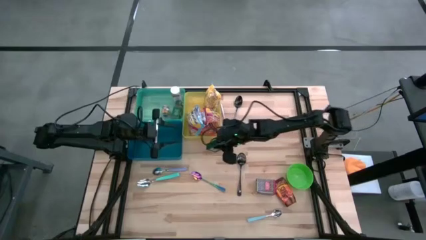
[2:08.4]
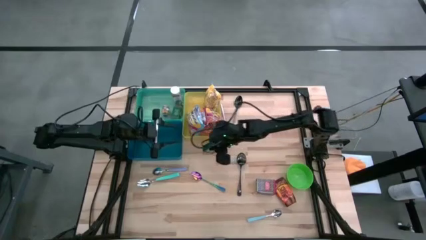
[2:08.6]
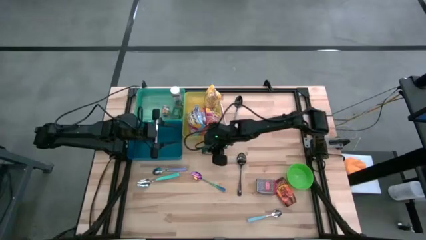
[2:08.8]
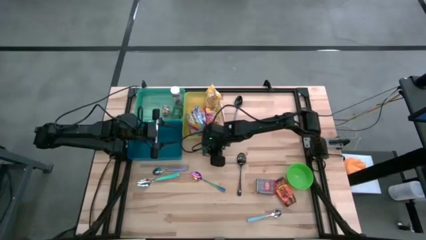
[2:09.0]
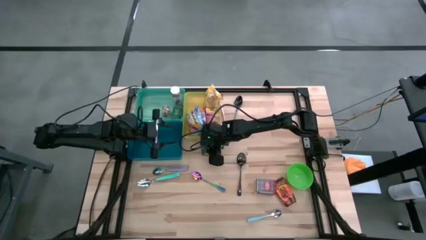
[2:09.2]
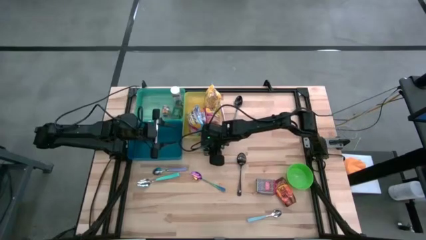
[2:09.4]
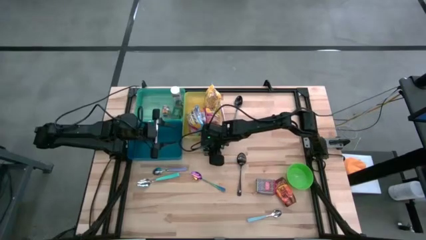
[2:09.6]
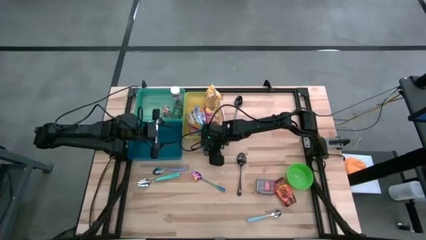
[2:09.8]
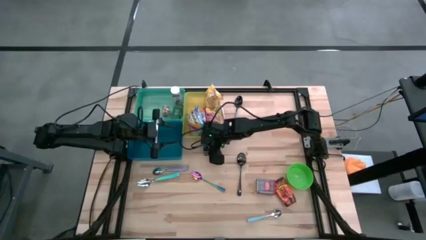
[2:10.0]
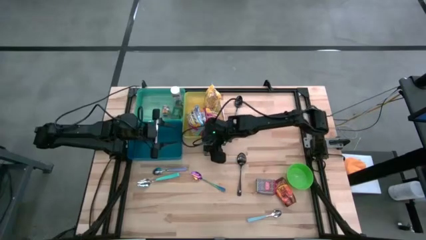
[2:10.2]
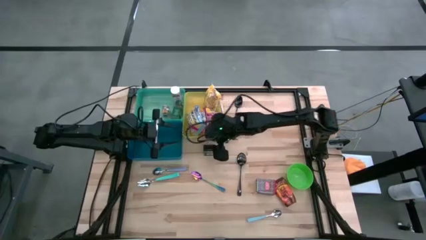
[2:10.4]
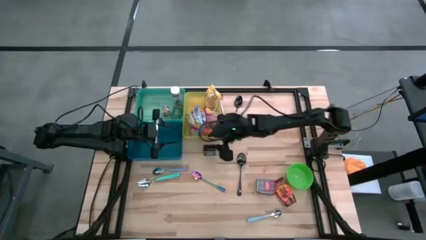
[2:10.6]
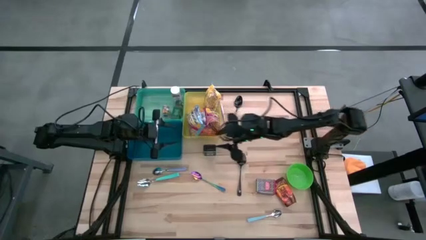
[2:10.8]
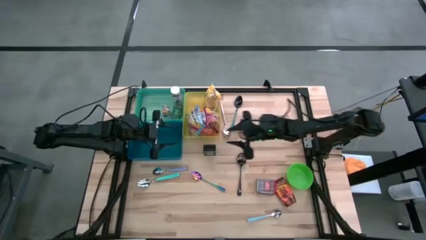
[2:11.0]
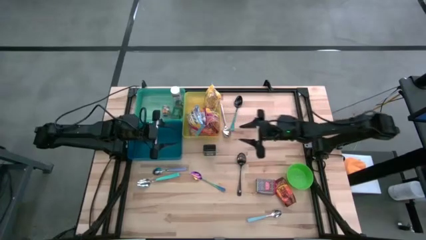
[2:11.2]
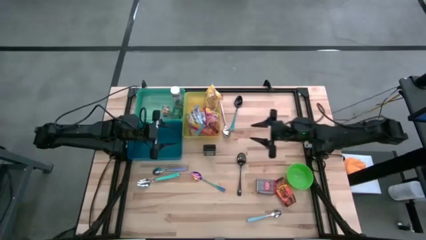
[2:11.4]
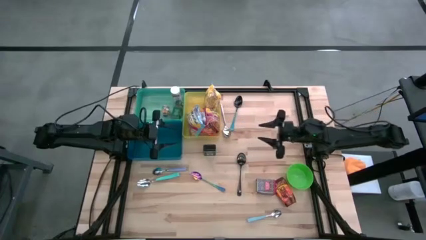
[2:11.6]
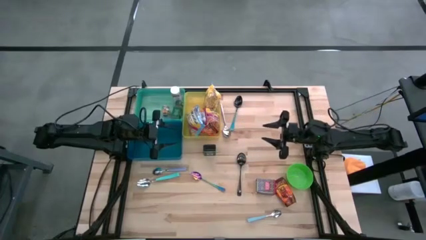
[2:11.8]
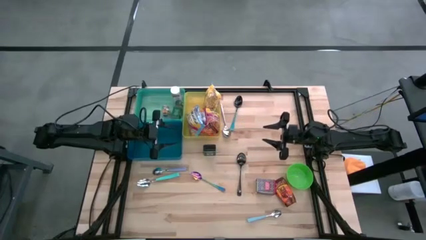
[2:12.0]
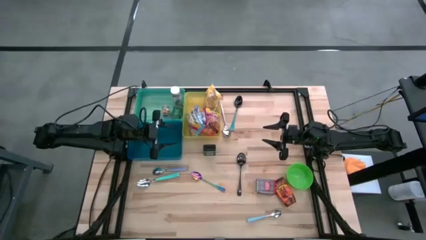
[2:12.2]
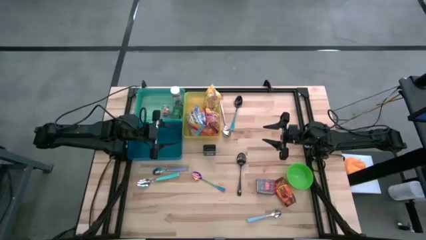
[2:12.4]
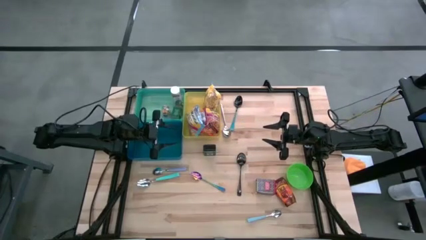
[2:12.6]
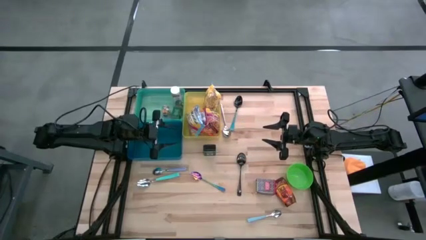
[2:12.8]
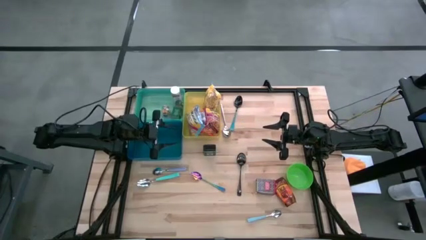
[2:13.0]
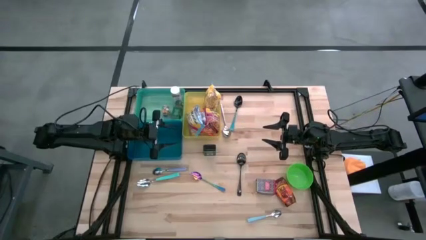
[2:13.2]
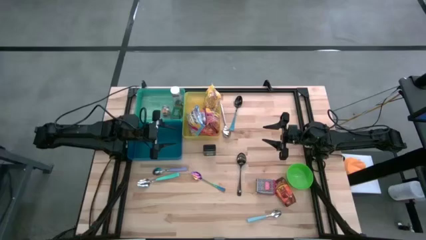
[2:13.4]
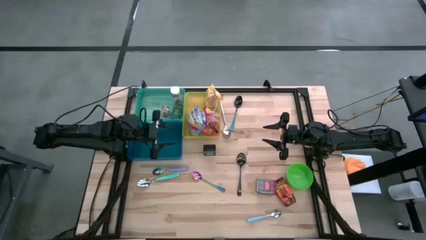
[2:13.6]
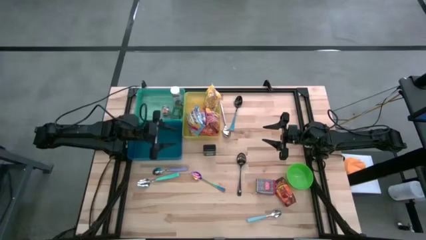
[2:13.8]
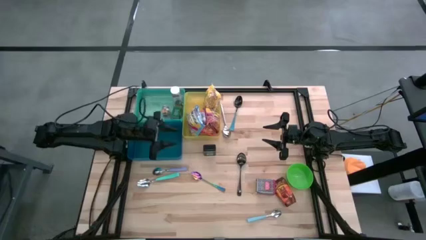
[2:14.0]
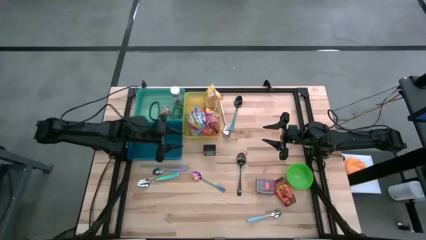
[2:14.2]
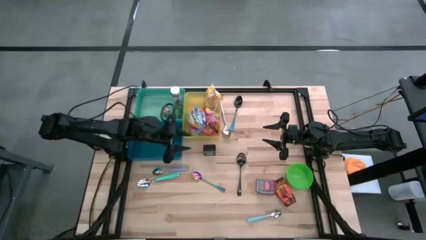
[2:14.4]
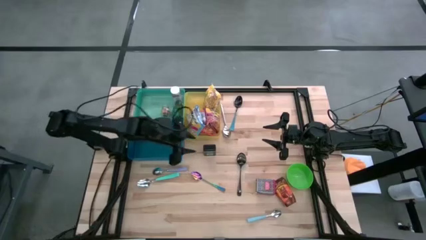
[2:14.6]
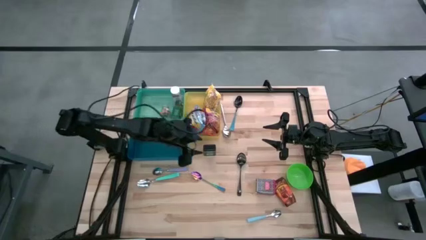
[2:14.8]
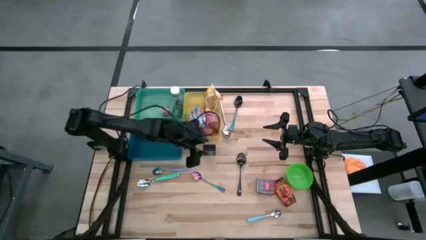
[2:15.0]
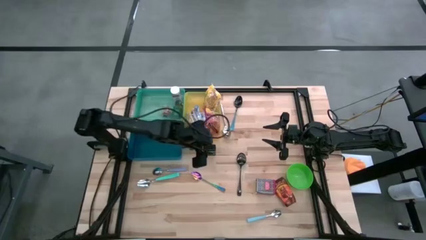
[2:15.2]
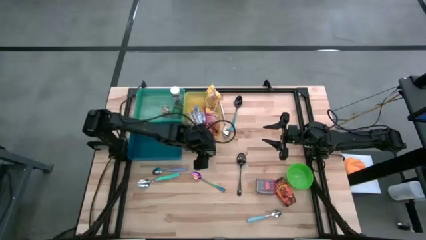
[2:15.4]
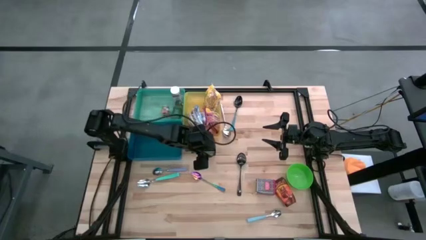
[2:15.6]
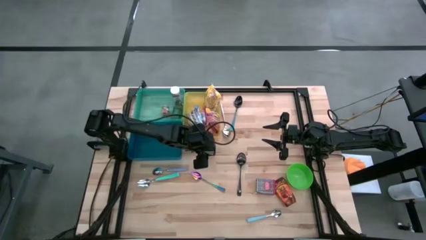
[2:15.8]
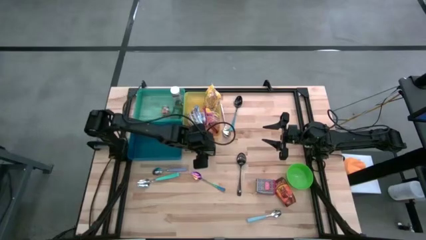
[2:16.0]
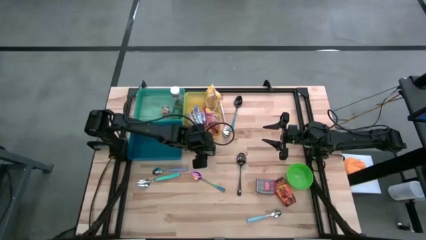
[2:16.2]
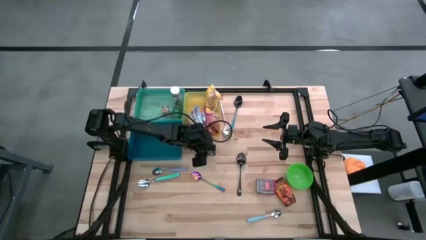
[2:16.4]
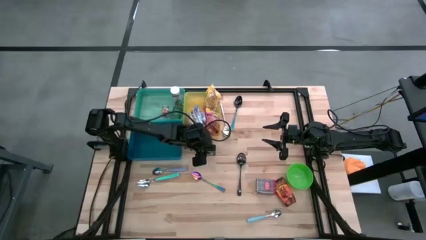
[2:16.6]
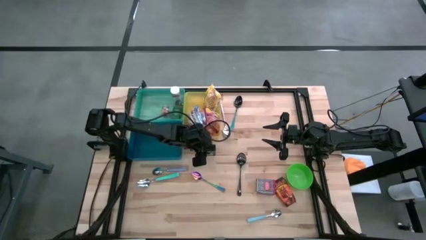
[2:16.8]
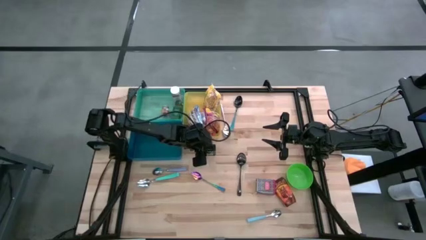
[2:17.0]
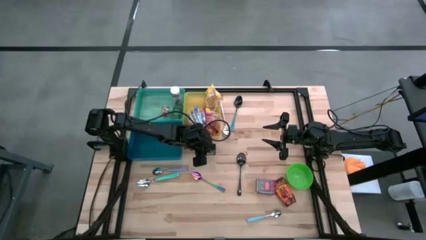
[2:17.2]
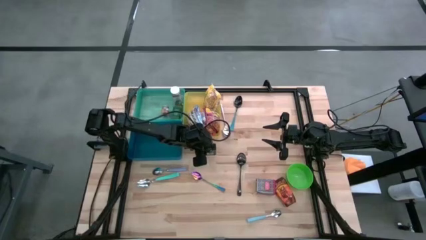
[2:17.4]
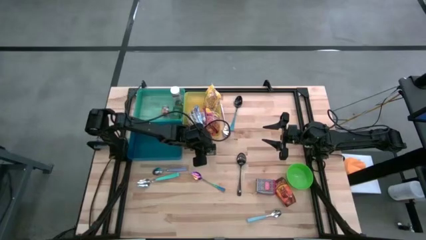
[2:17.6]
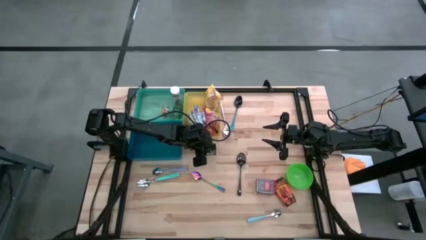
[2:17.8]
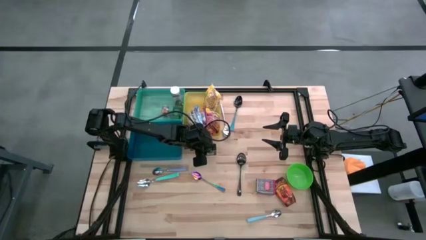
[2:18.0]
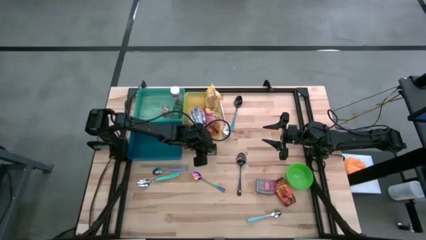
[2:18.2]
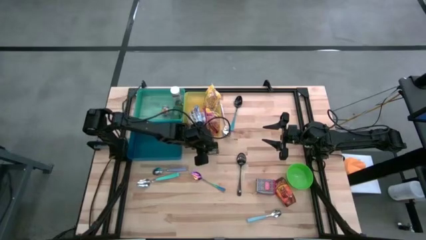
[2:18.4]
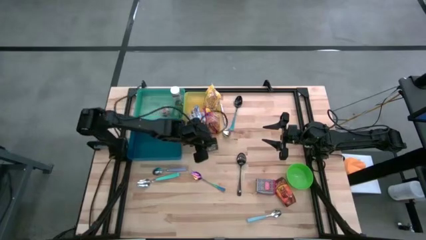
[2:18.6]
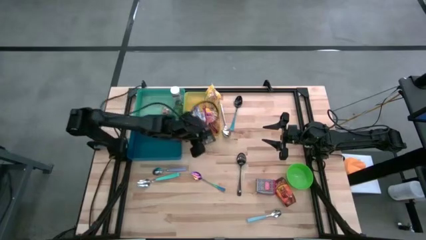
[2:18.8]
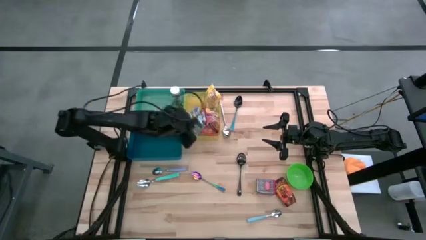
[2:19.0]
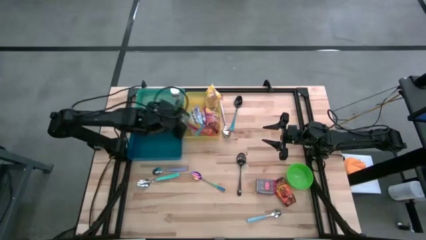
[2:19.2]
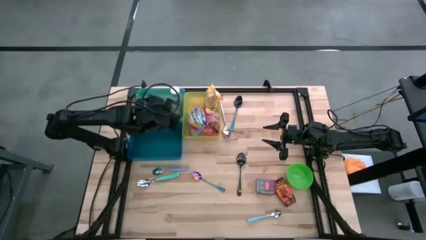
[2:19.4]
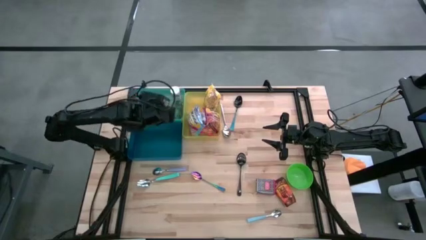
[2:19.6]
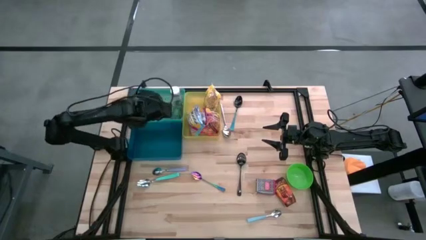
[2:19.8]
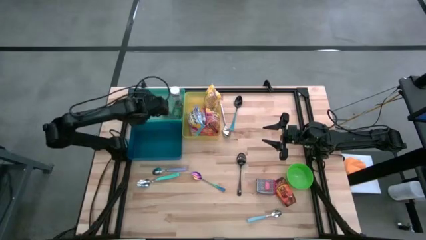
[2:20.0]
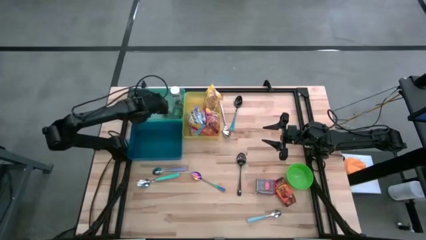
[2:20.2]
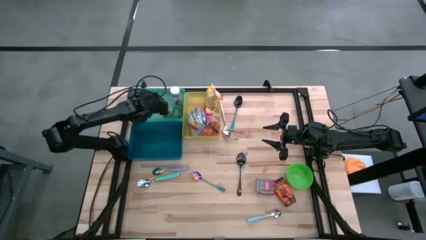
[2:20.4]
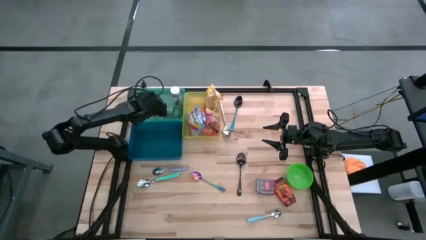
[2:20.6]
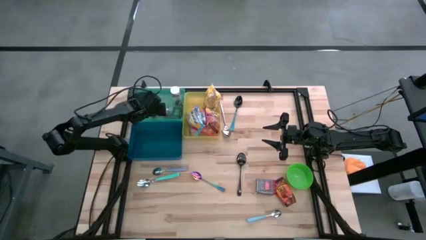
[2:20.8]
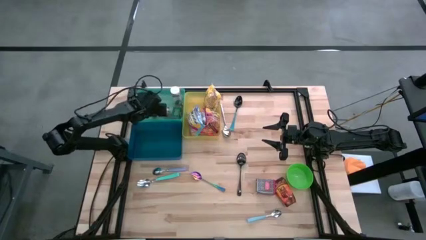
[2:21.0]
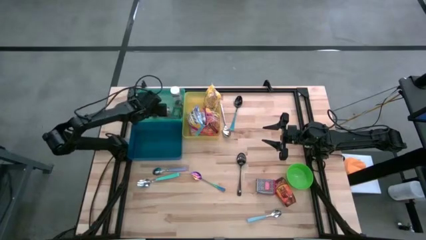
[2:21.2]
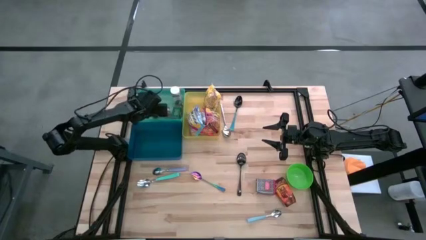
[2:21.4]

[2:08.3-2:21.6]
Put the green spice can into the green bin
